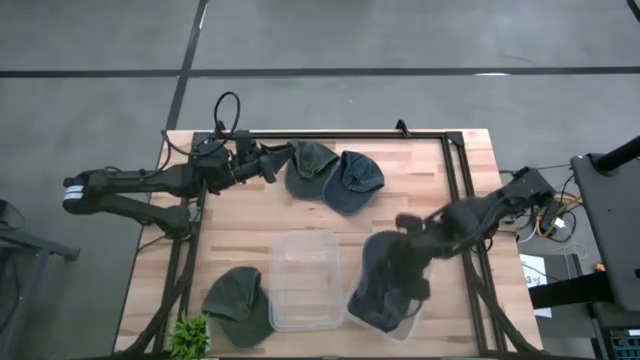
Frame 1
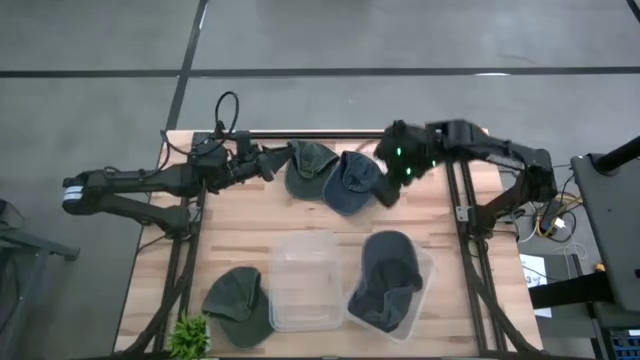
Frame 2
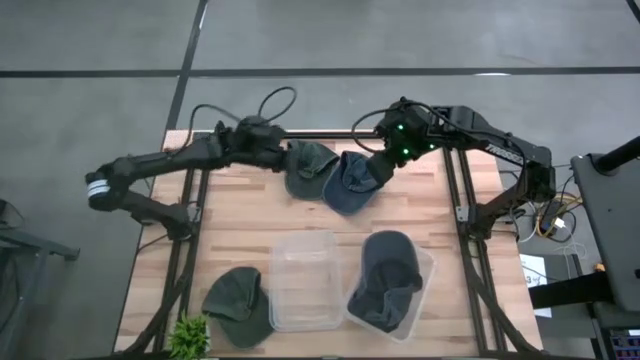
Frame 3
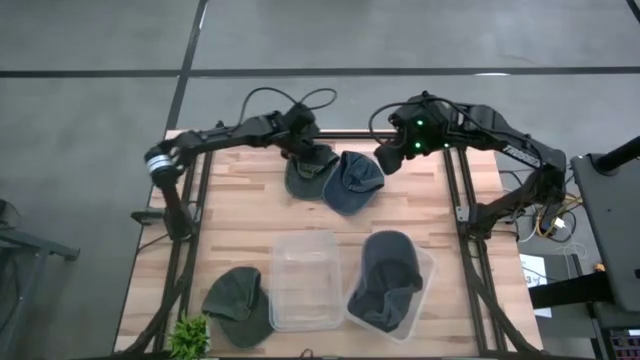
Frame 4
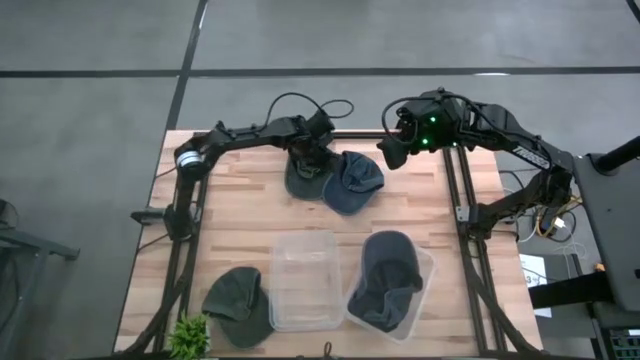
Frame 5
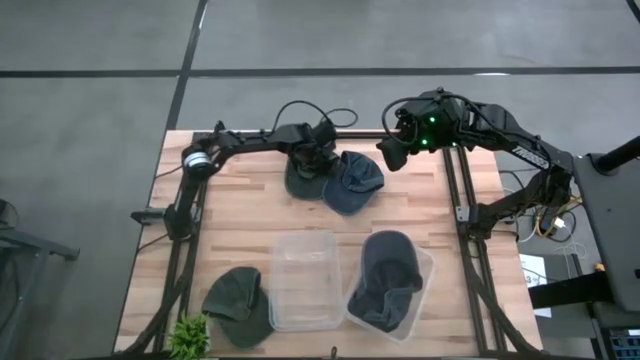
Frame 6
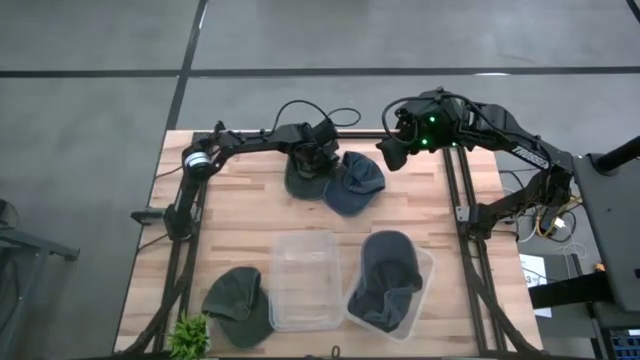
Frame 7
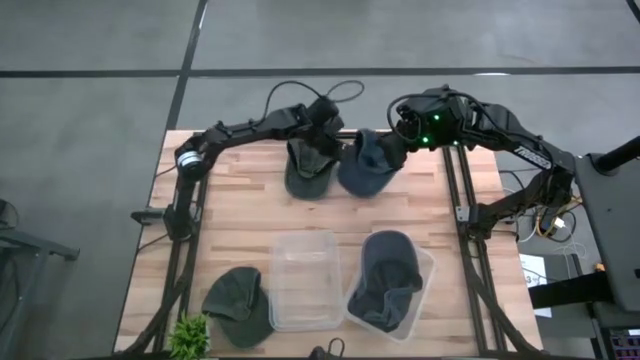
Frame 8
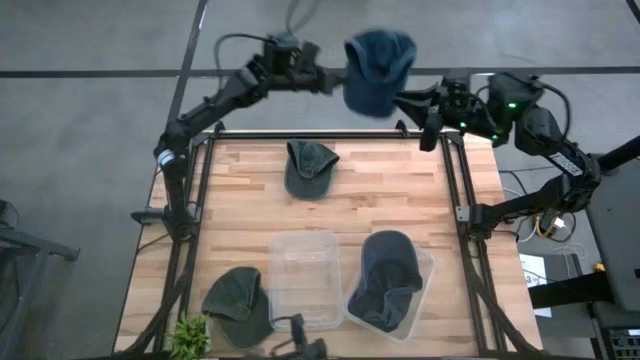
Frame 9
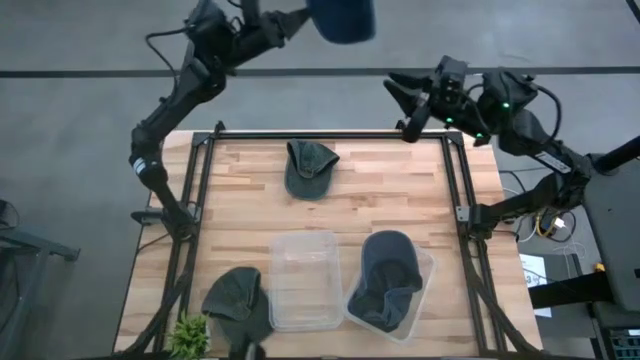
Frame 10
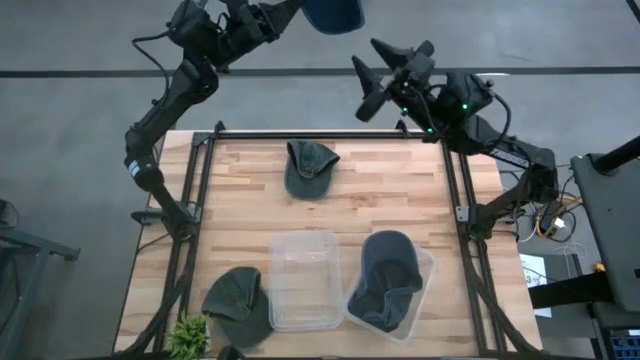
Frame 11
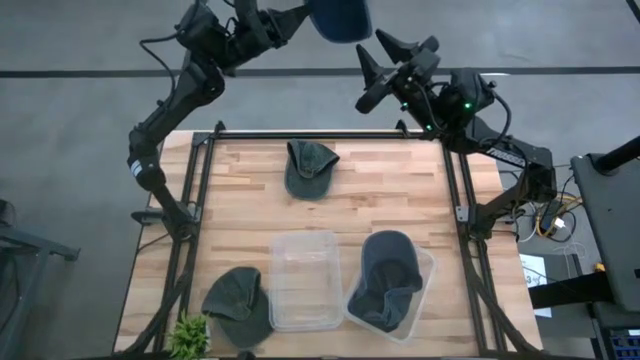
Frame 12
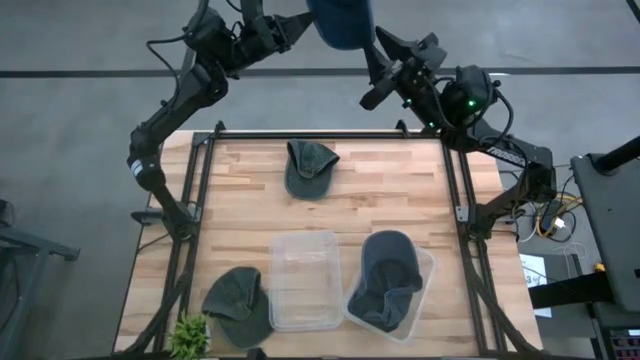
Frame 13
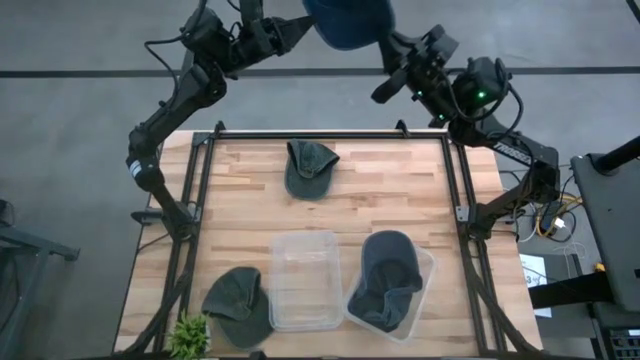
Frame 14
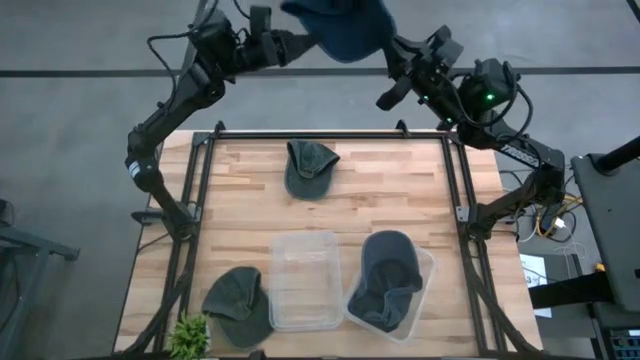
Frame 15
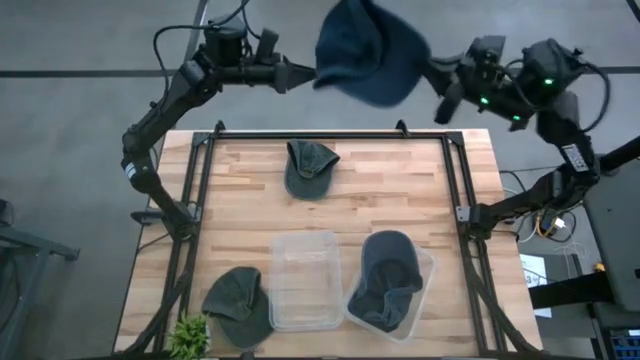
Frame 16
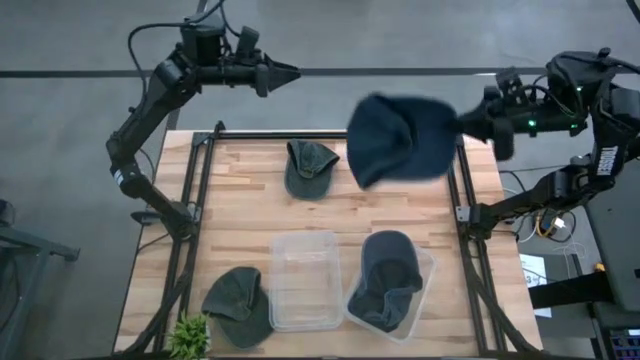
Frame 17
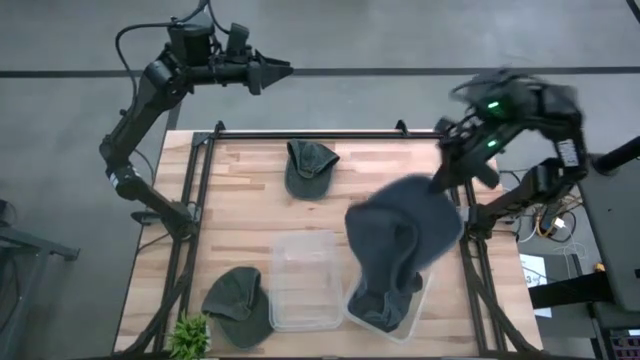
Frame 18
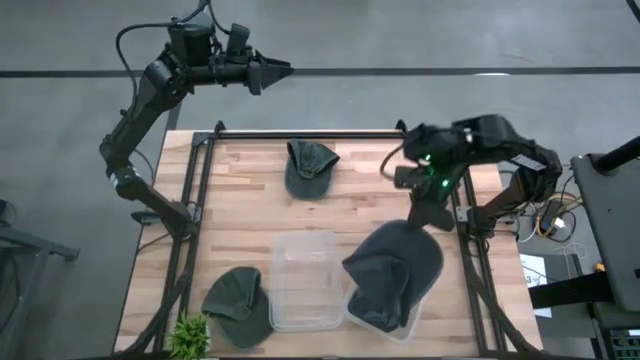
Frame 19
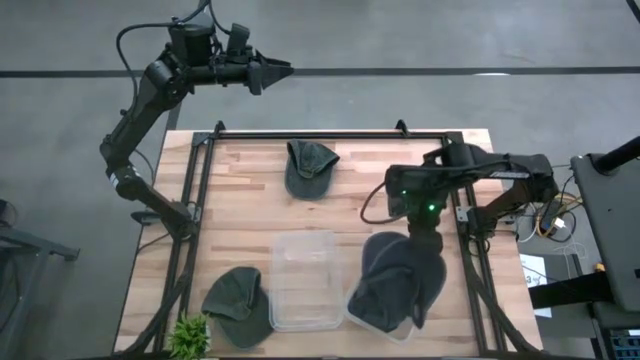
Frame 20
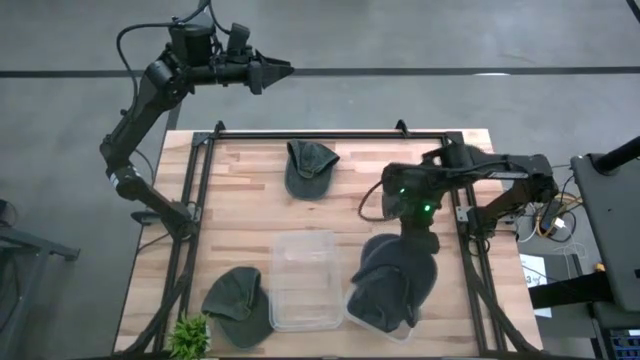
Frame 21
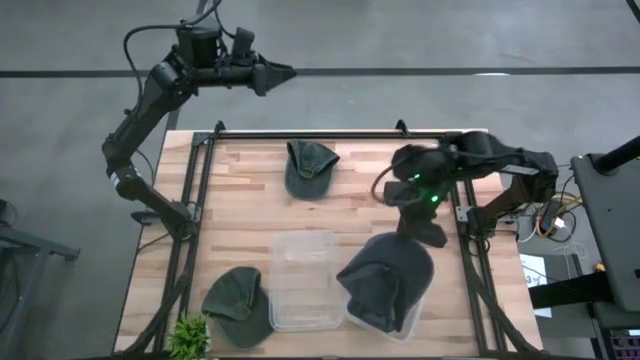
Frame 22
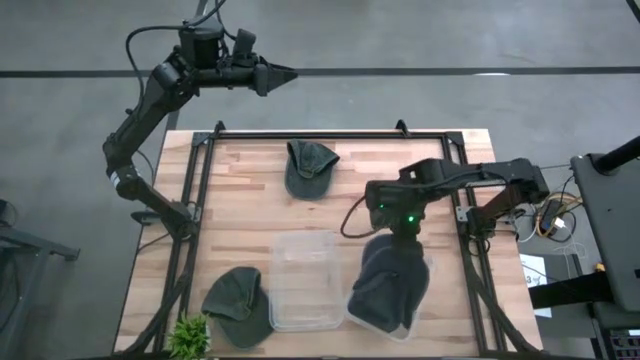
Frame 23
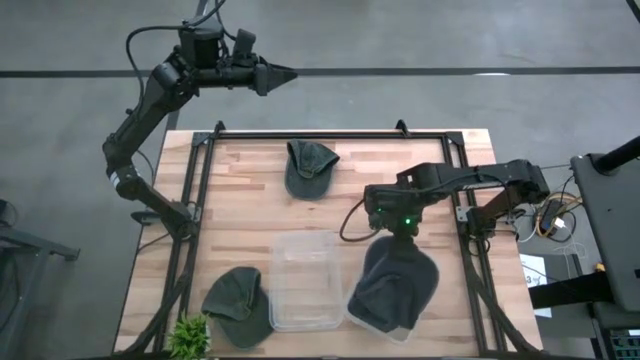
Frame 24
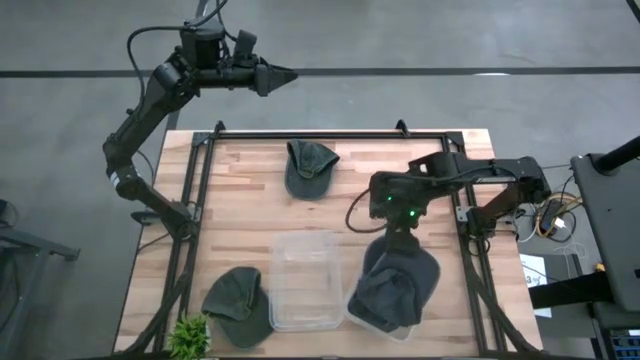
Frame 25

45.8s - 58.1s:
Task: Pick & Place hat
Put the blue cap into the right transparent container

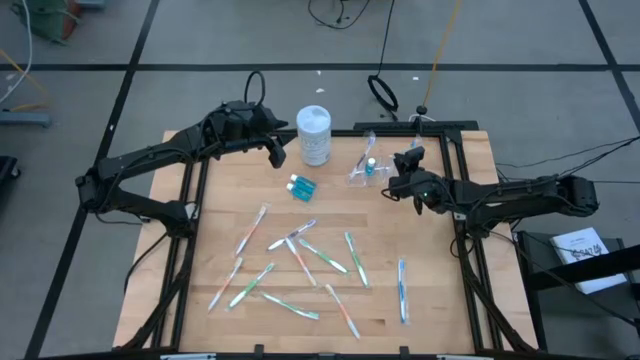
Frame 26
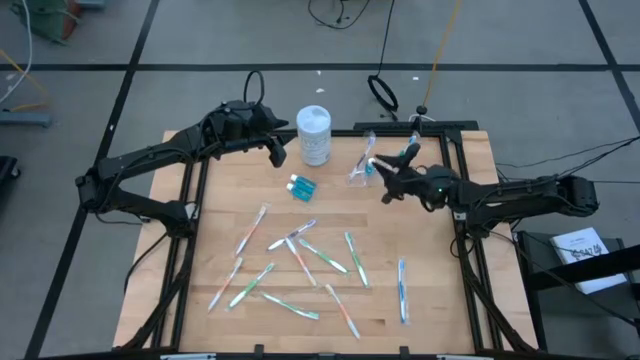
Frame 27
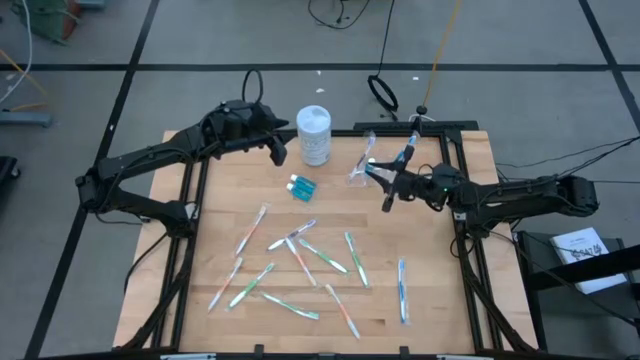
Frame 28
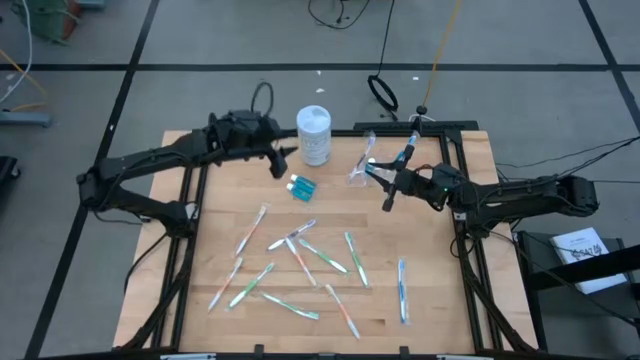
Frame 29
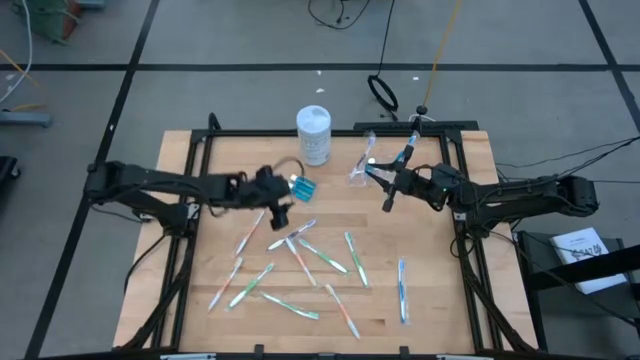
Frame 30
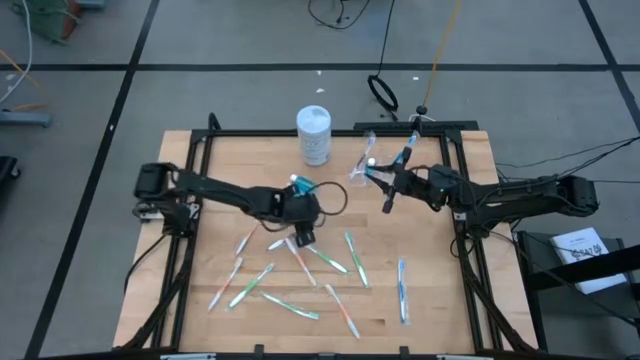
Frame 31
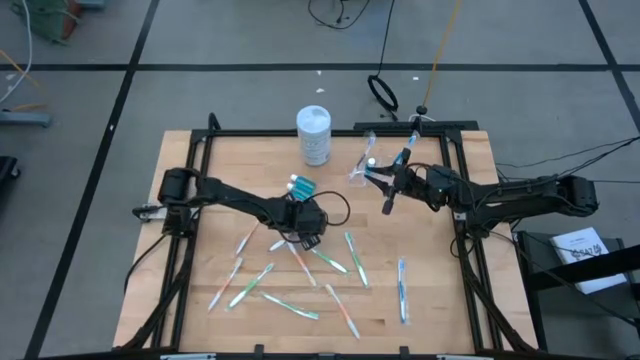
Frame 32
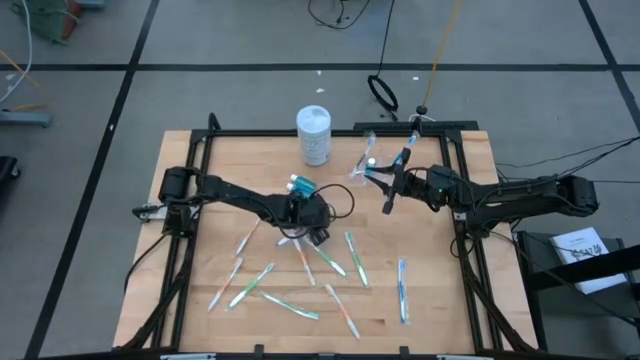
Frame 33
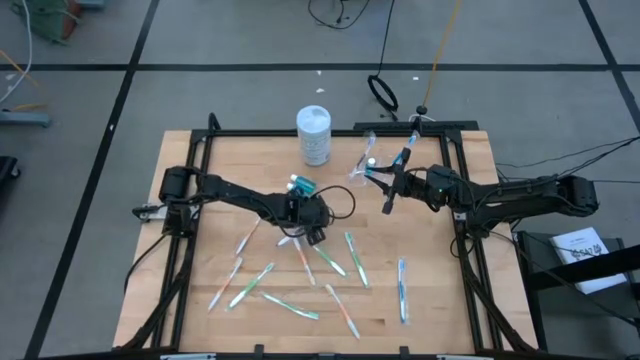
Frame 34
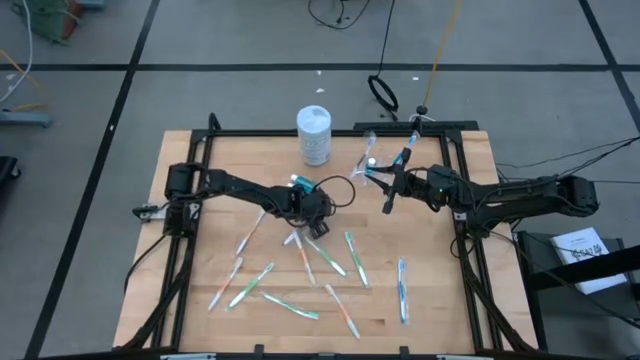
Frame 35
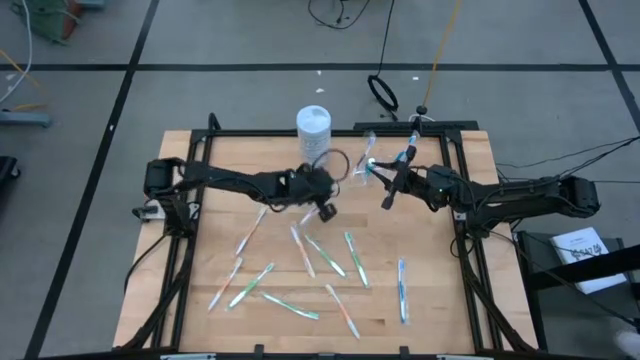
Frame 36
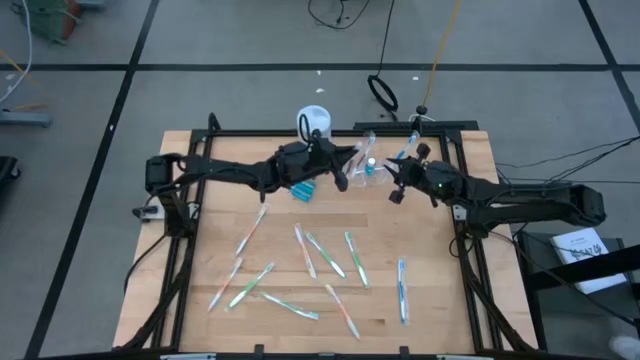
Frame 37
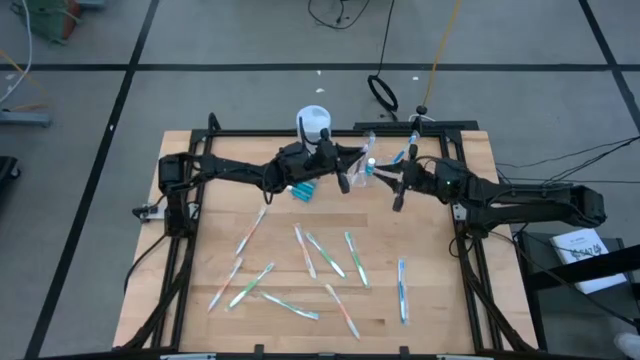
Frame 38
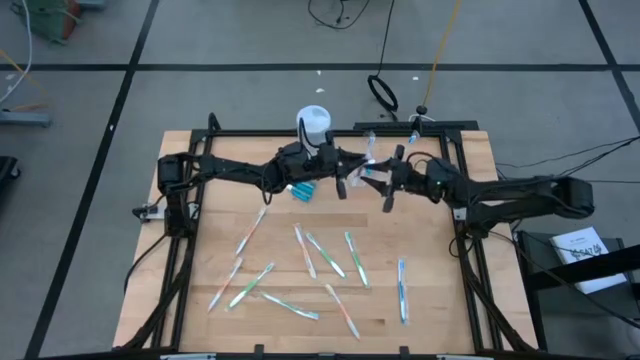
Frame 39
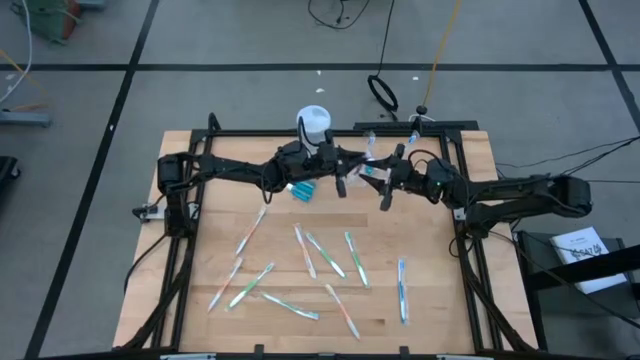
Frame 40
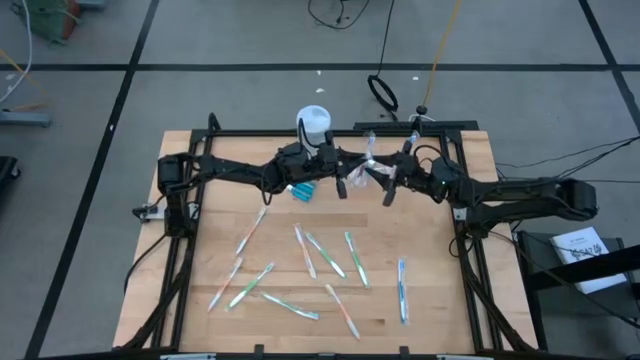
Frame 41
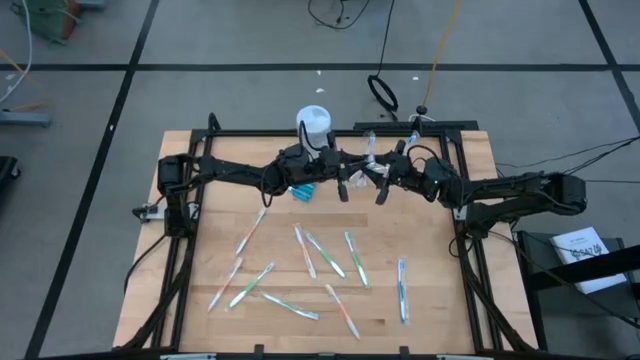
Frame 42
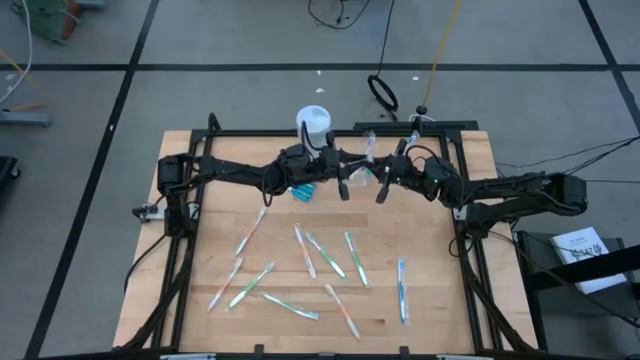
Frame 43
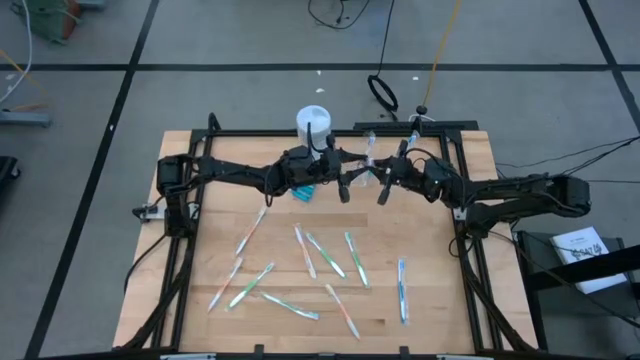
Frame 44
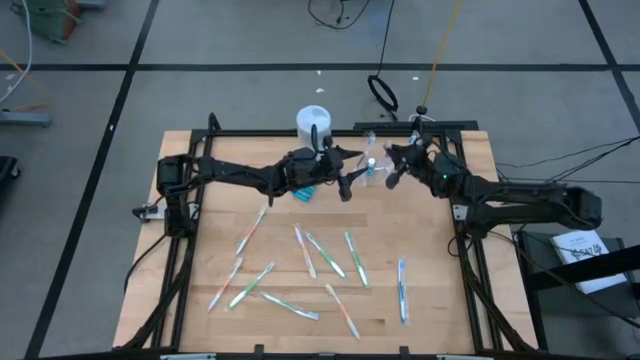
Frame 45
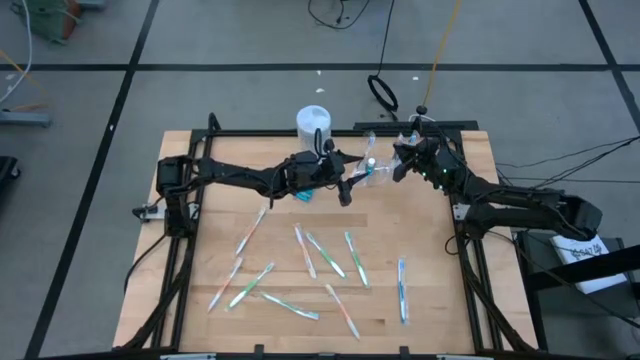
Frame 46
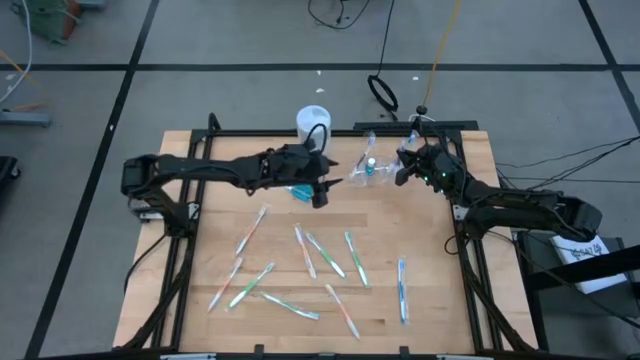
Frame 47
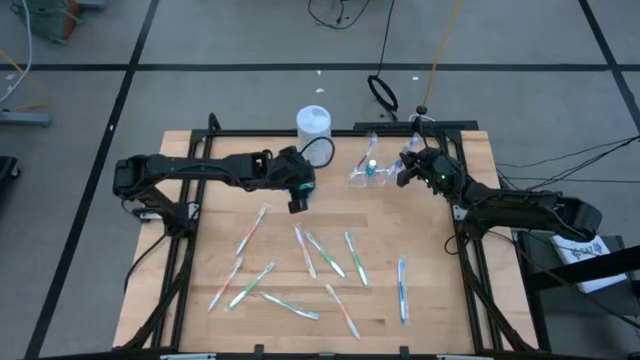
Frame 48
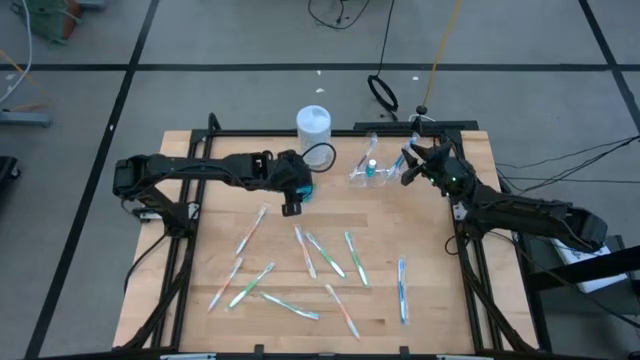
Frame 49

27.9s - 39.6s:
Task: Pick & Place toothbrushing station
Put the purple toothbrush into the transparent organizer
